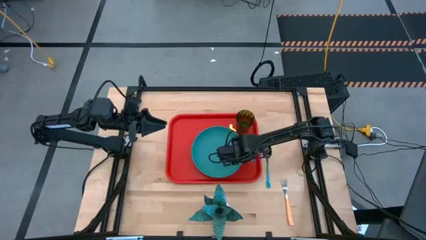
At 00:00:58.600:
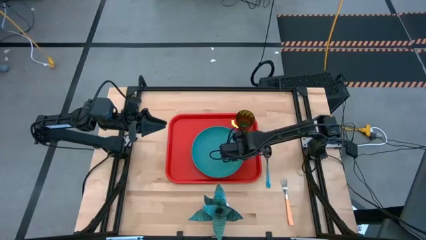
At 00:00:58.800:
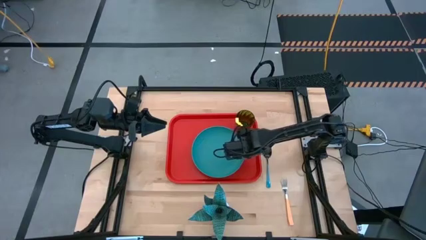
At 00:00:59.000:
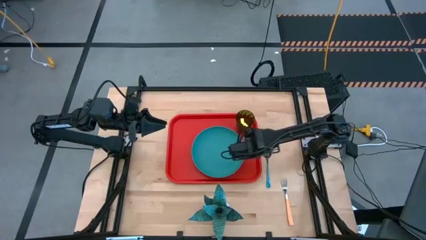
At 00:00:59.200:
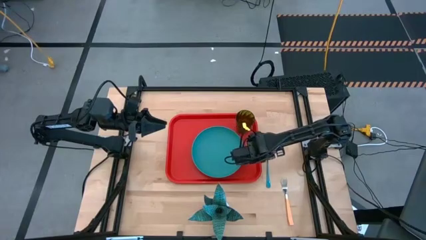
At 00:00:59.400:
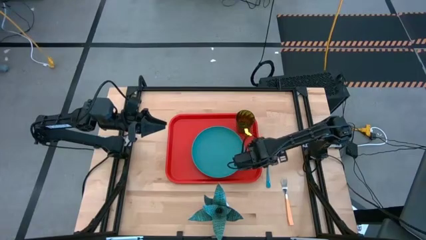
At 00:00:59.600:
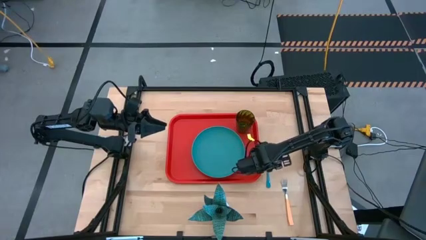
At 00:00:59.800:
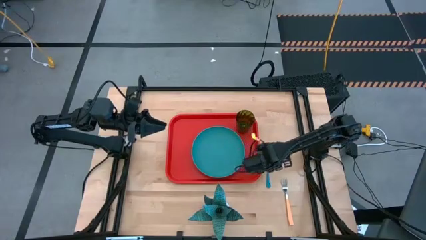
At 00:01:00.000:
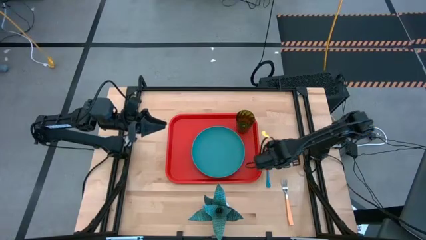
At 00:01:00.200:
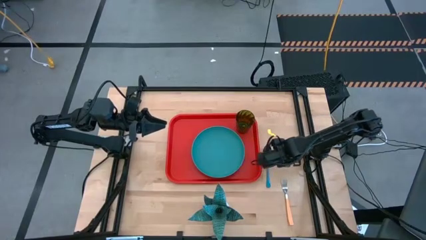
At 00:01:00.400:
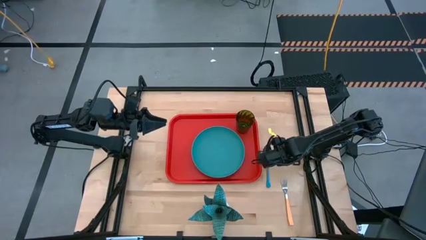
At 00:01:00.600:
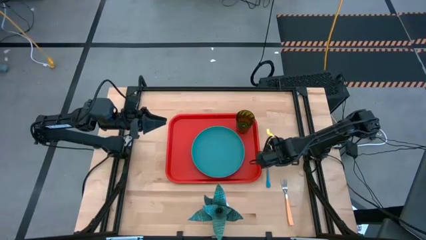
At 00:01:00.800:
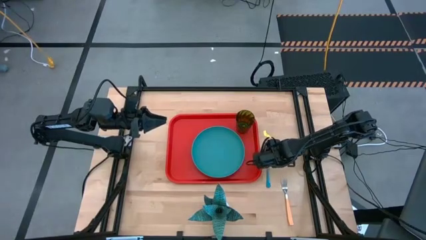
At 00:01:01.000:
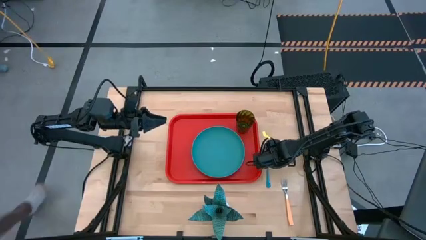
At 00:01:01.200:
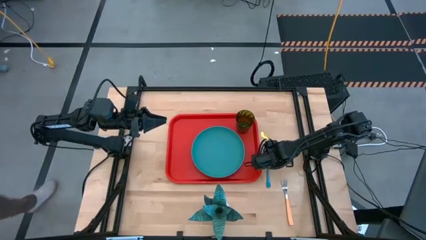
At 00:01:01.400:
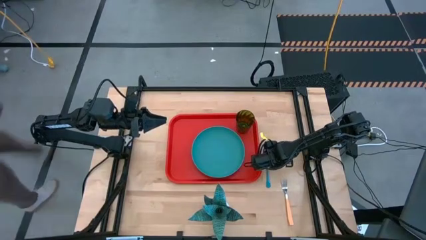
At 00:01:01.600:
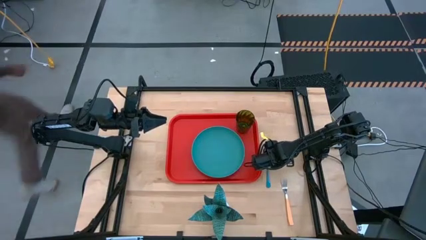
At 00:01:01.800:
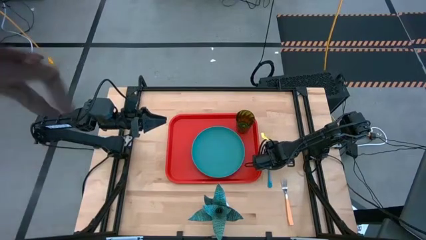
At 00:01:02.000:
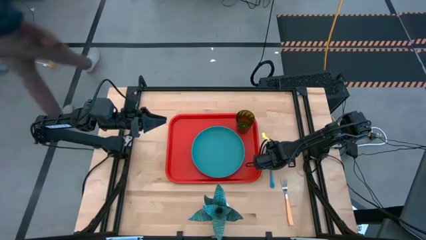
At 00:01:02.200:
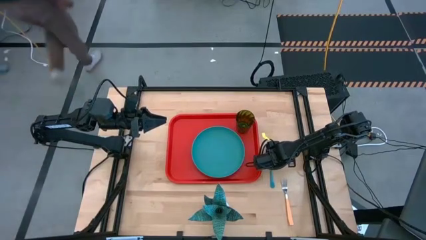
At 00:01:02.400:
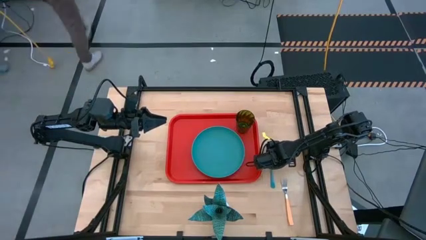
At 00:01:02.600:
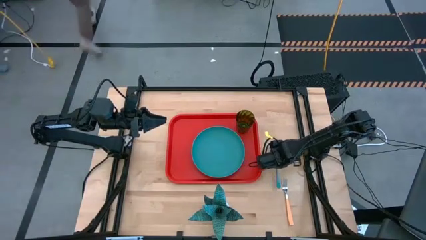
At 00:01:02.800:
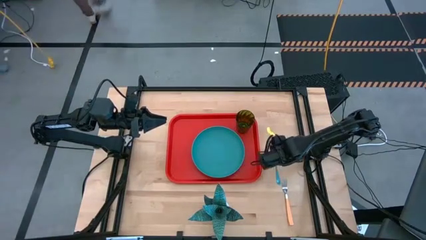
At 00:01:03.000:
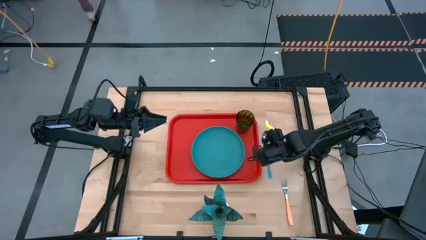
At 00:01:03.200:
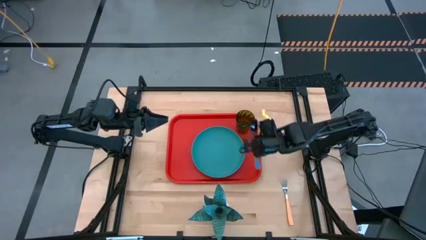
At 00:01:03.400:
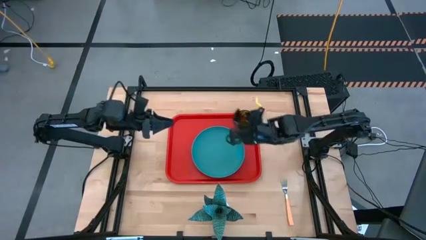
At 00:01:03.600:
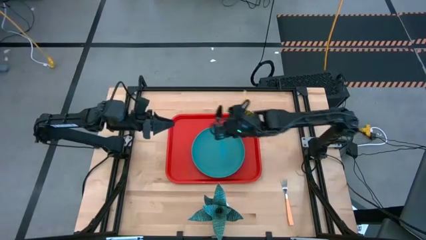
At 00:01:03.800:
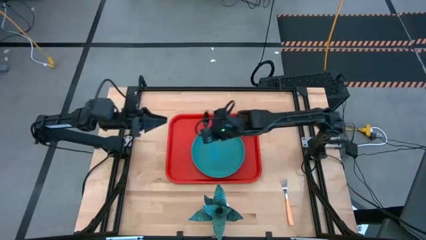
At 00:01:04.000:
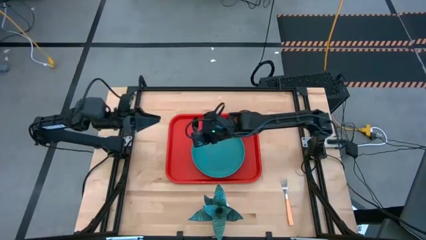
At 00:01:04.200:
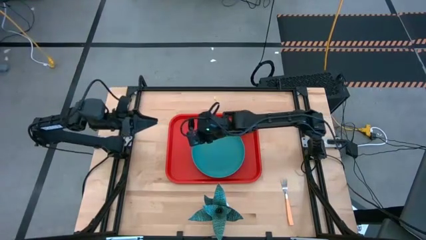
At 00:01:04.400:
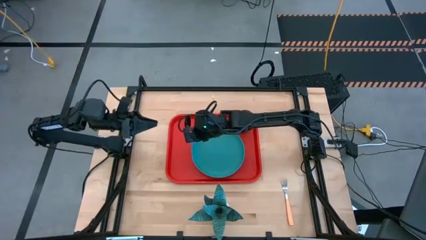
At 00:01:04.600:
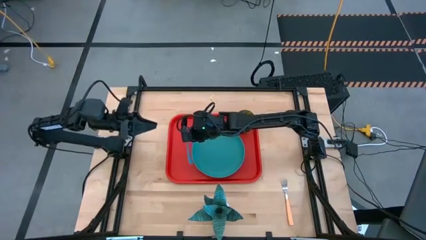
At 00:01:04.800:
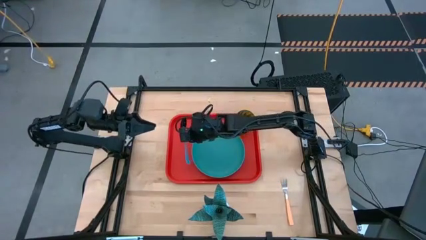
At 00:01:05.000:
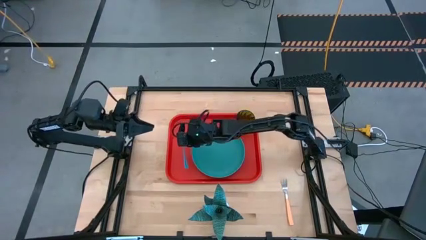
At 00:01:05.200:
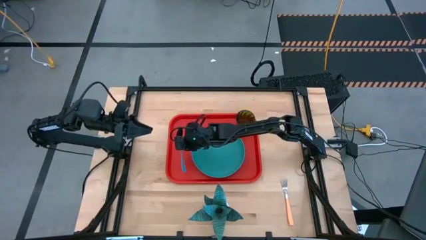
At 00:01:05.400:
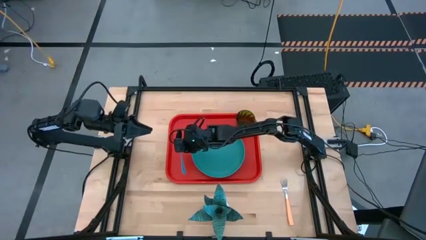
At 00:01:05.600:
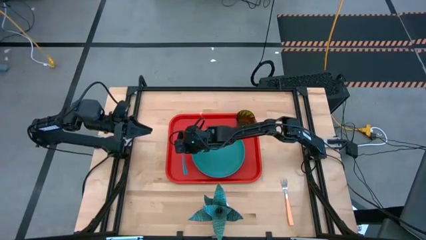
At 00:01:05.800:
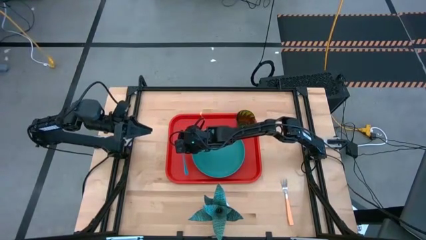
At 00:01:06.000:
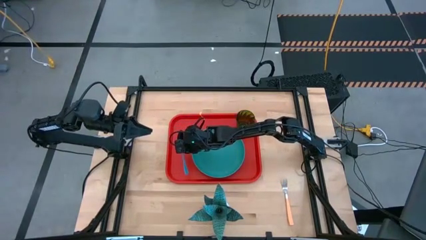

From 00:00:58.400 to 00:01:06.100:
Task: Pick and place plate/cup/fork/spoon on tray
Put the green spoon on the orange tray to the left of the green plate

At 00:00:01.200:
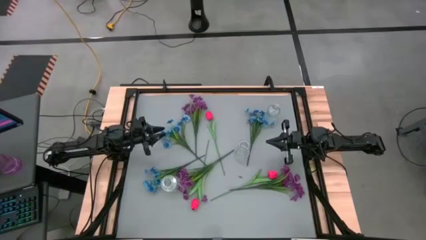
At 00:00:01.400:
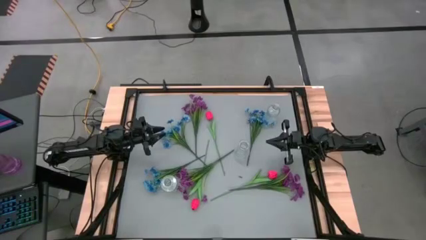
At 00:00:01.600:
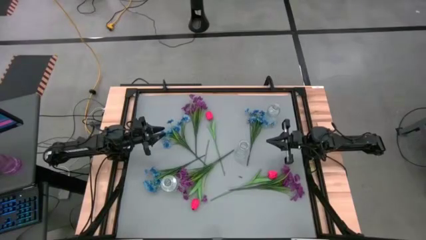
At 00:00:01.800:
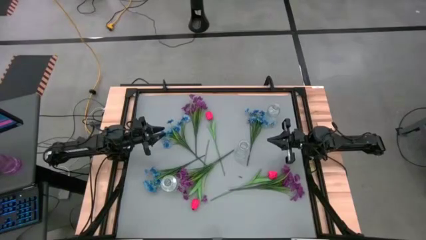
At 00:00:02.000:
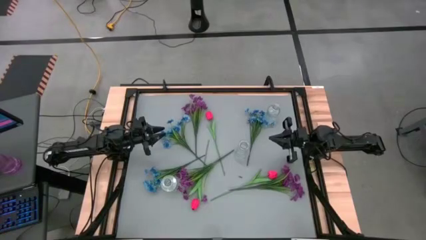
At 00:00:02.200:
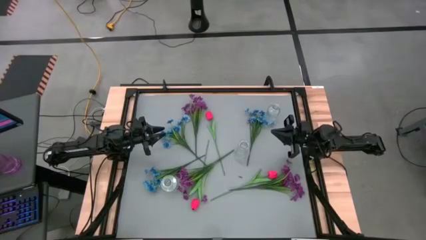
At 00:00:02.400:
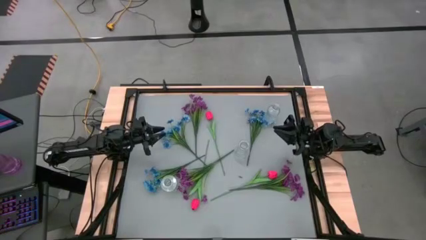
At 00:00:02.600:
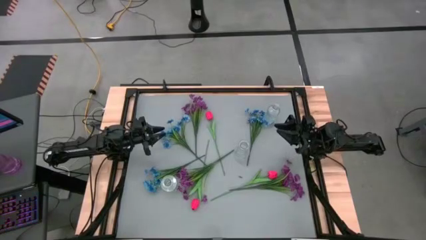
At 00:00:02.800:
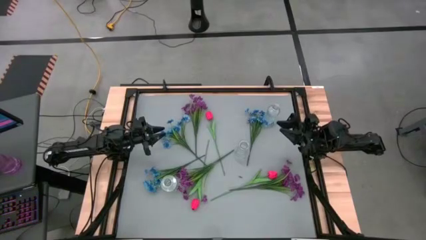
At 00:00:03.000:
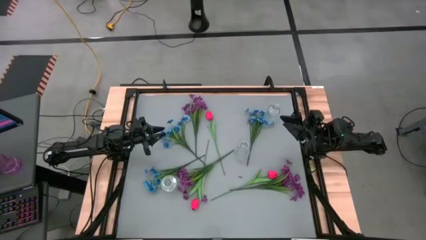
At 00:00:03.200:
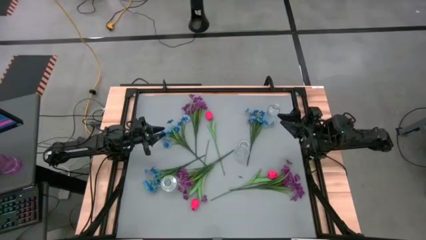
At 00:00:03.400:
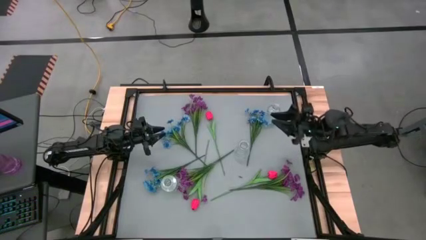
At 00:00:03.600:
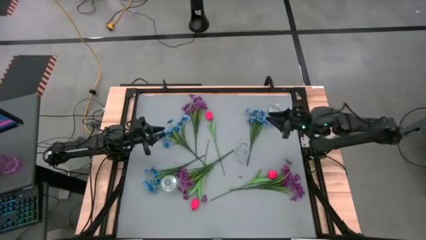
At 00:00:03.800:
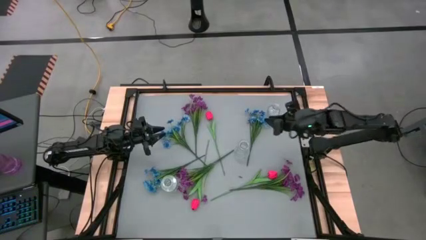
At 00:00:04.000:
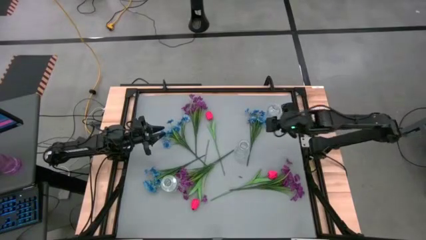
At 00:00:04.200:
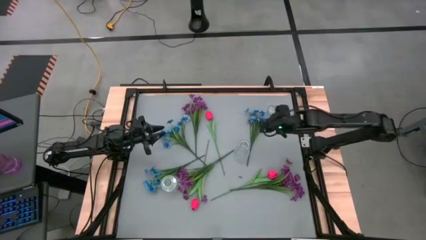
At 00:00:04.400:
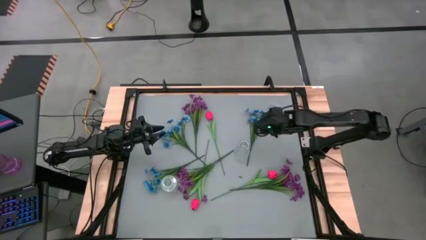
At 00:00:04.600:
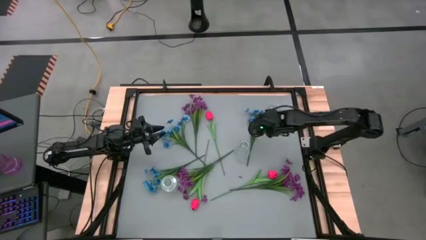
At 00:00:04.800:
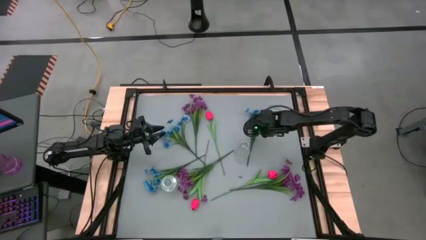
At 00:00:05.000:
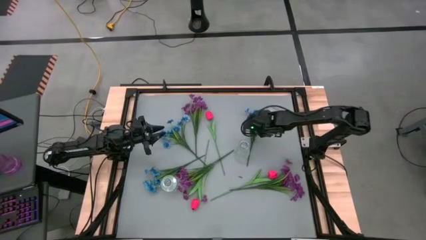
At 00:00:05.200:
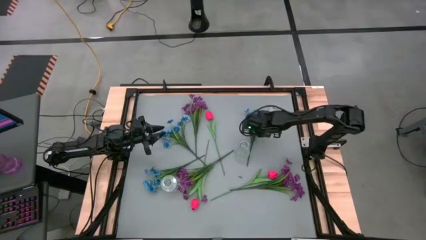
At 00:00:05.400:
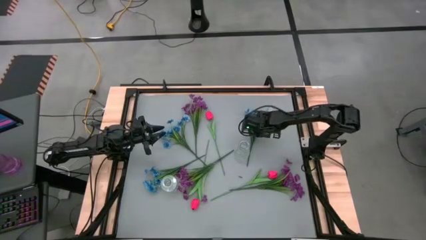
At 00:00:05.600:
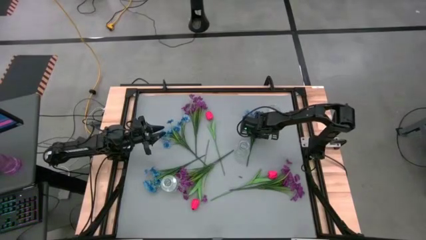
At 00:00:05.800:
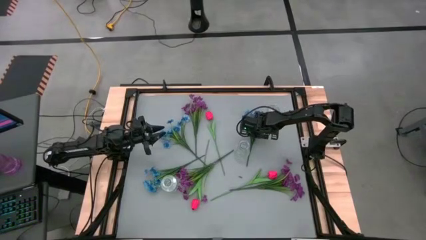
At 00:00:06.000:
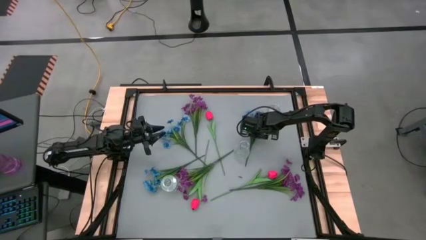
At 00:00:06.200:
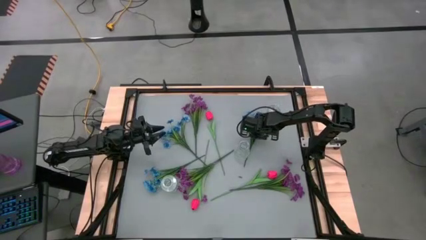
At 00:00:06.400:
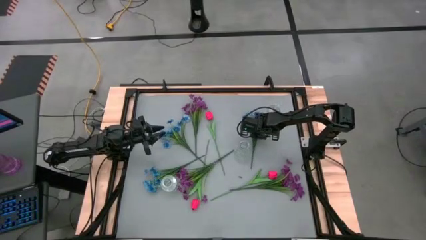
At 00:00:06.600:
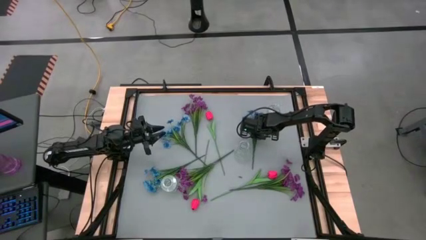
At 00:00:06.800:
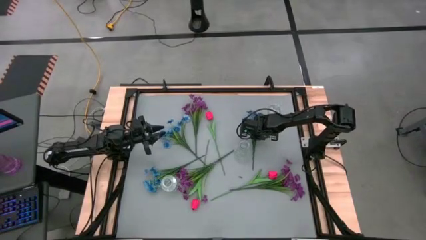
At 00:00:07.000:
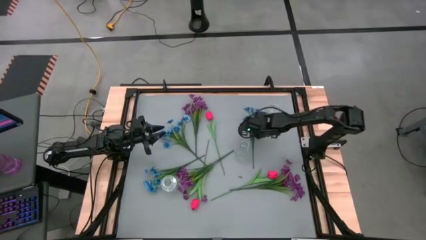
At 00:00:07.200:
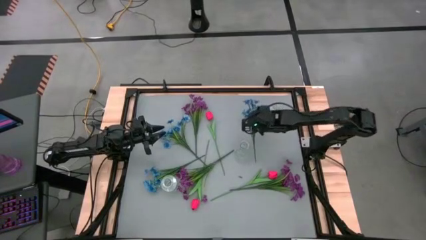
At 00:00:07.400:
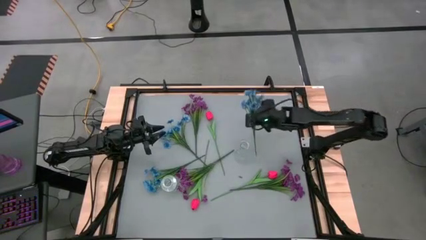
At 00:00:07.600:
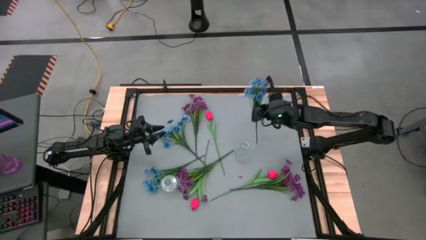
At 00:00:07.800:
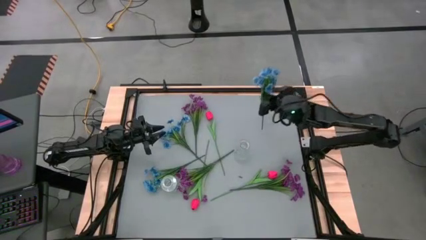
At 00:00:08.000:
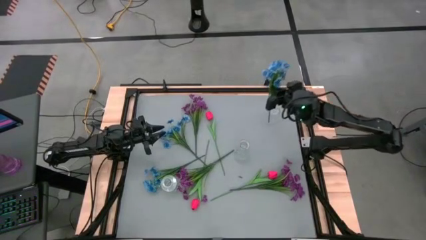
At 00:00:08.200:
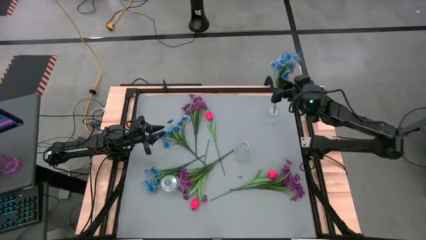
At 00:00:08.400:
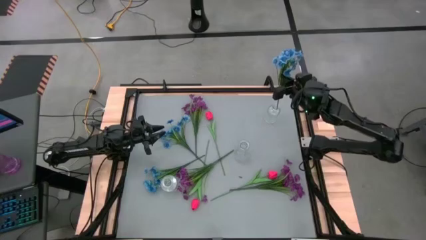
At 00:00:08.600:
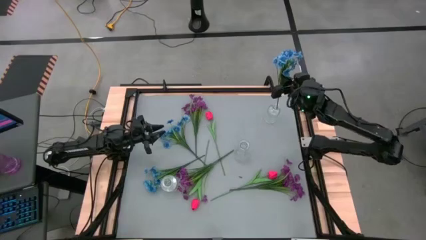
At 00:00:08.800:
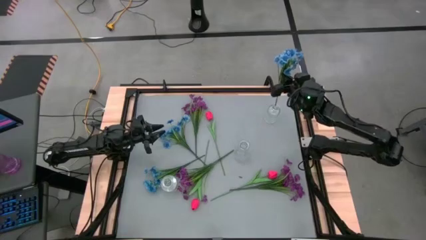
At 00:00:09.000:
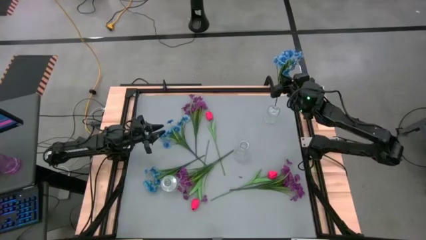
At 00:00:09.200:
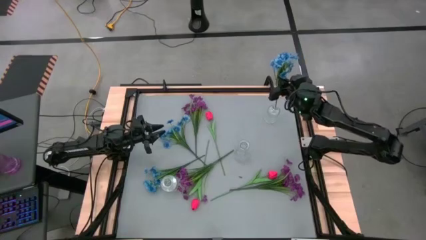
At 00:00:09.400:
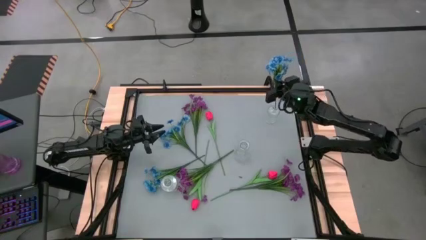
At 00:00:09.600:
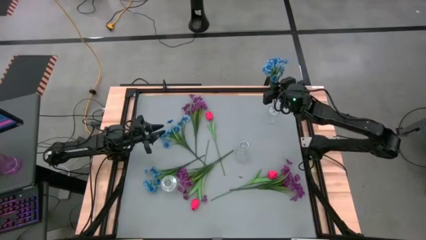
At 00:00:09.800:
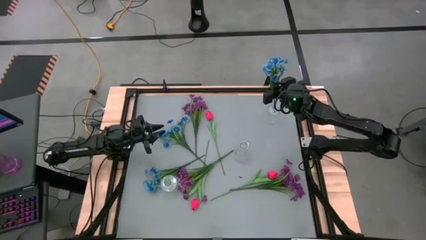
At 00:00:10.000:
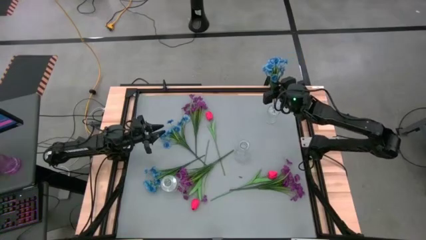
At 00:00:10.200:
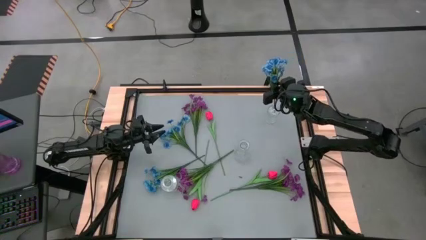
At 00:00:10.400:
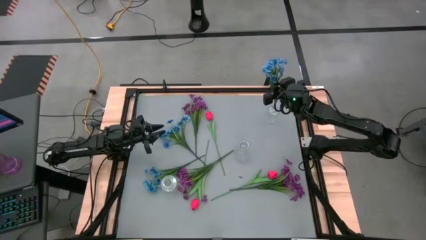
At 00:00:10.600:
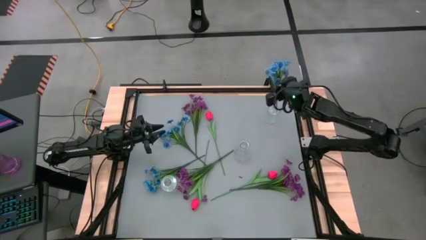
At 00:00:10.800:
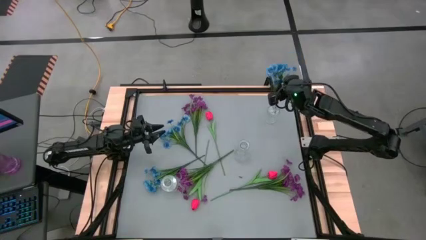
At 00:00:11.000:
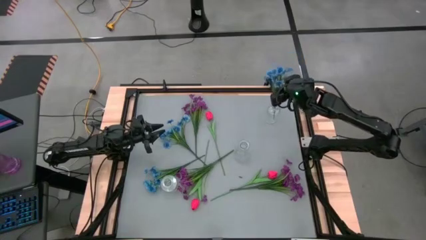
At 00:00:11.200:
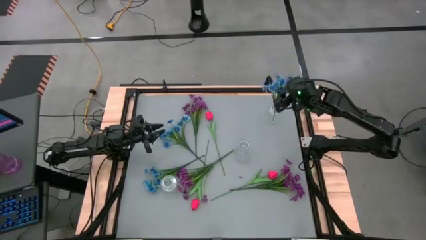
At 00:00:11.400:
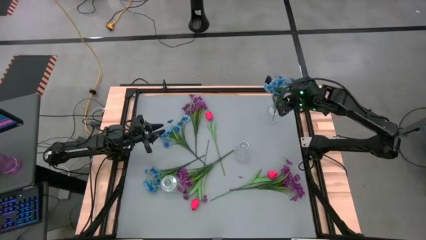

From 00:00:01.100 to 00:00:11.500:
Task: Sort flowers into vase by color
Put the top right blue flowers into the top transparent vase
